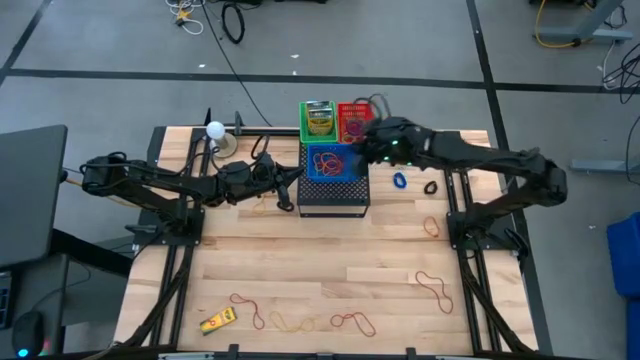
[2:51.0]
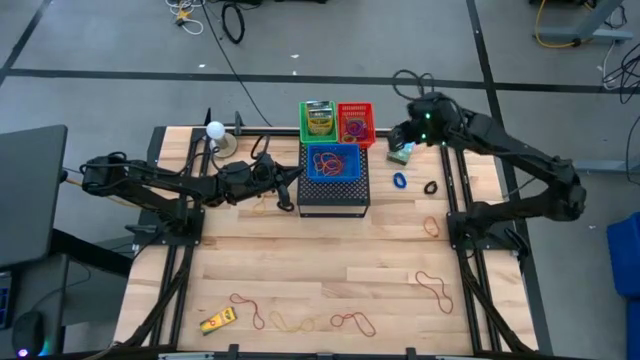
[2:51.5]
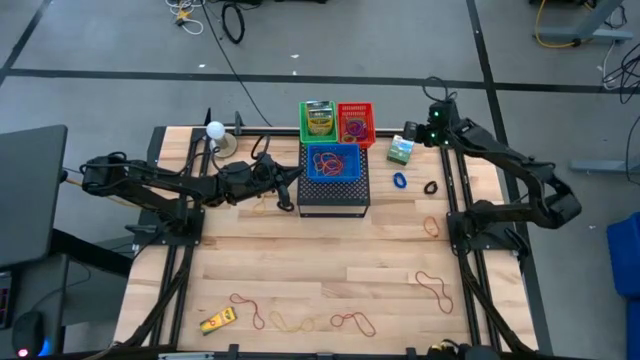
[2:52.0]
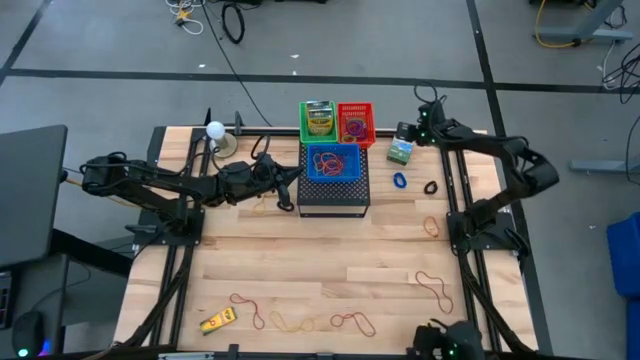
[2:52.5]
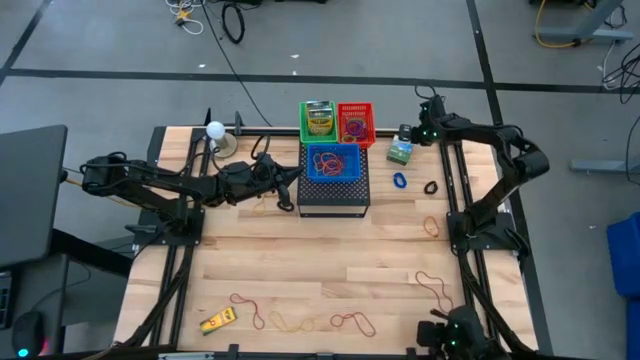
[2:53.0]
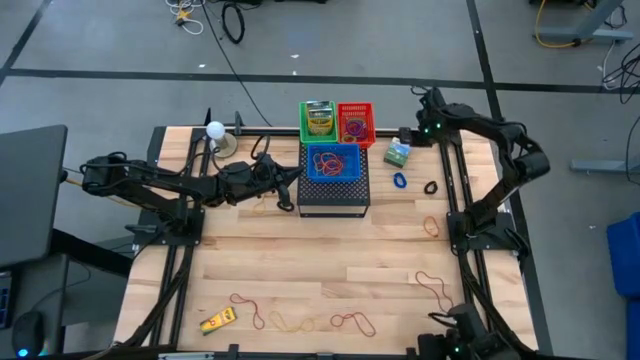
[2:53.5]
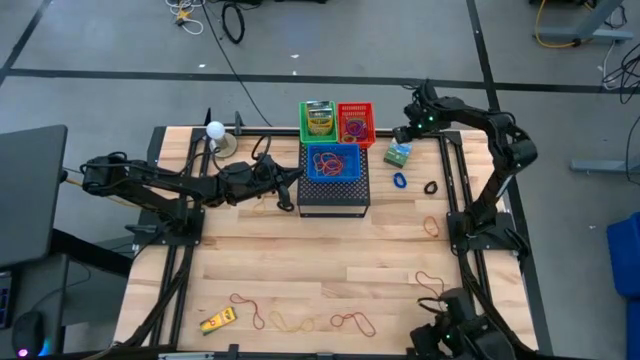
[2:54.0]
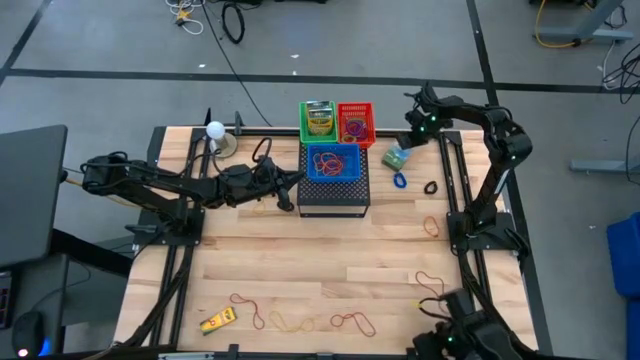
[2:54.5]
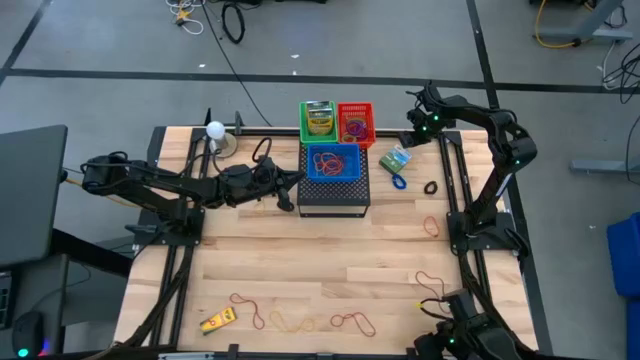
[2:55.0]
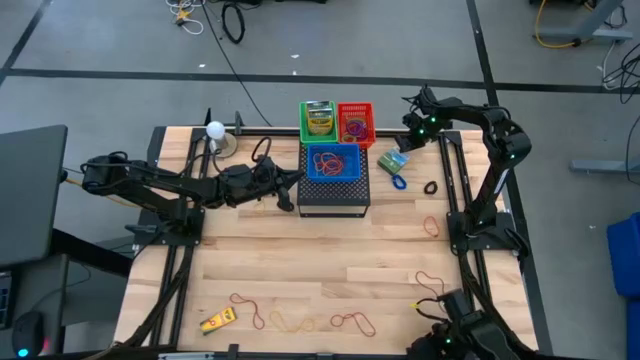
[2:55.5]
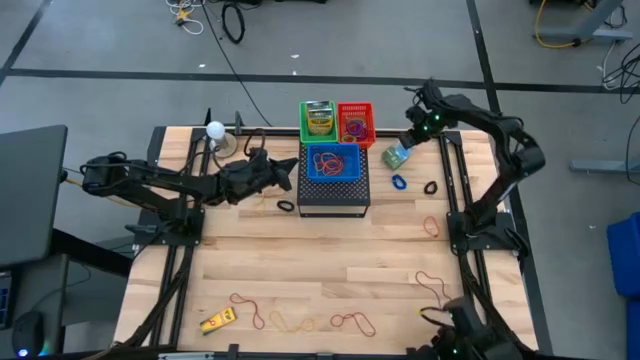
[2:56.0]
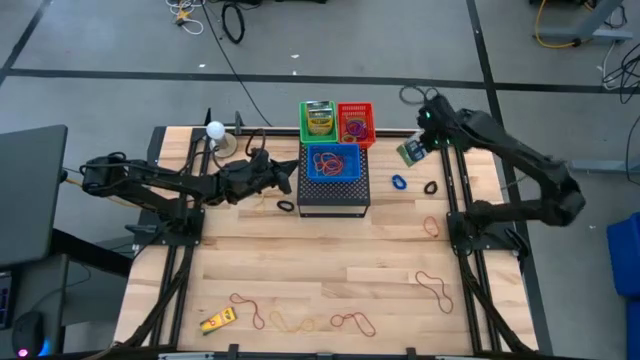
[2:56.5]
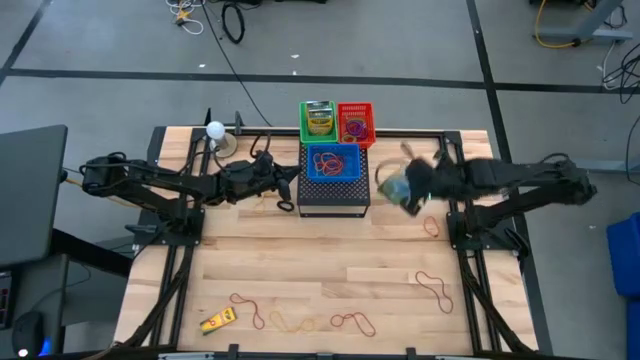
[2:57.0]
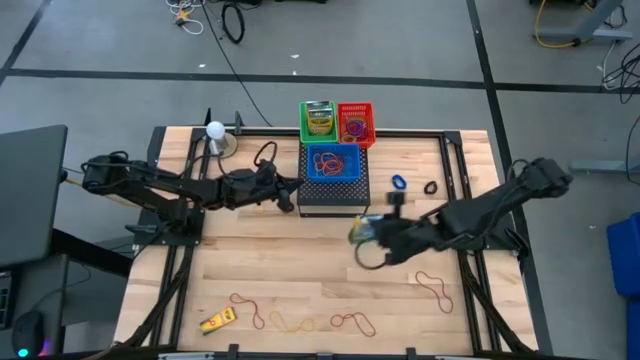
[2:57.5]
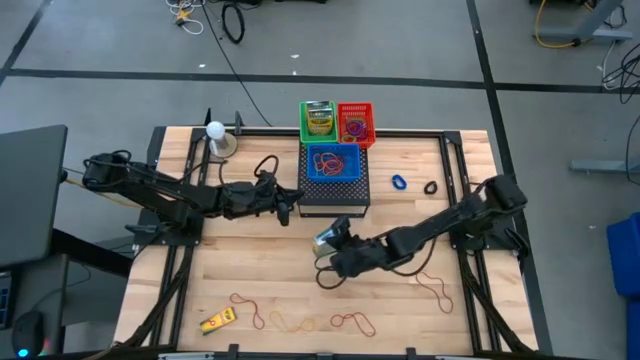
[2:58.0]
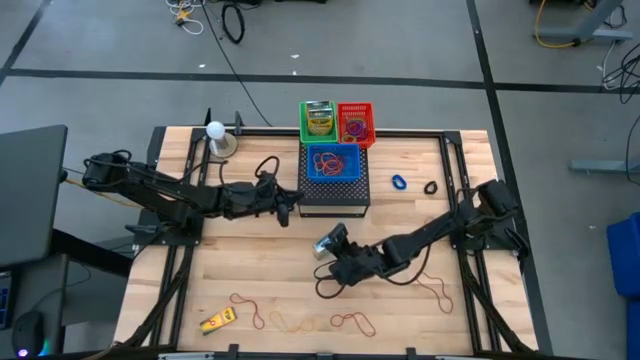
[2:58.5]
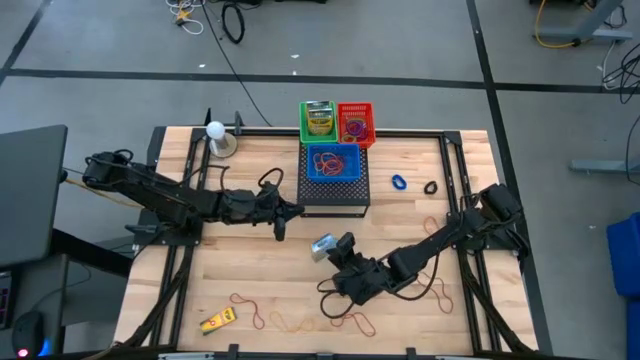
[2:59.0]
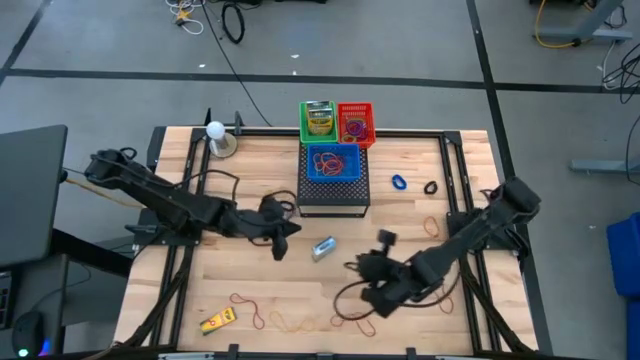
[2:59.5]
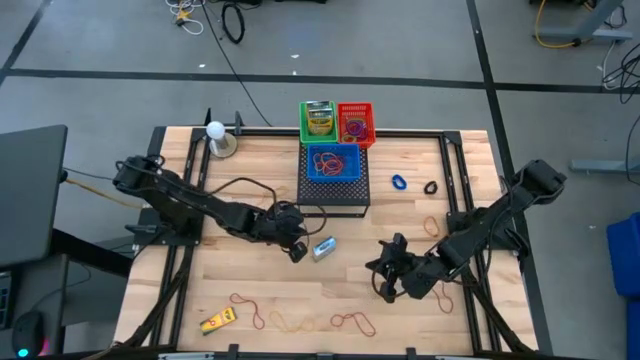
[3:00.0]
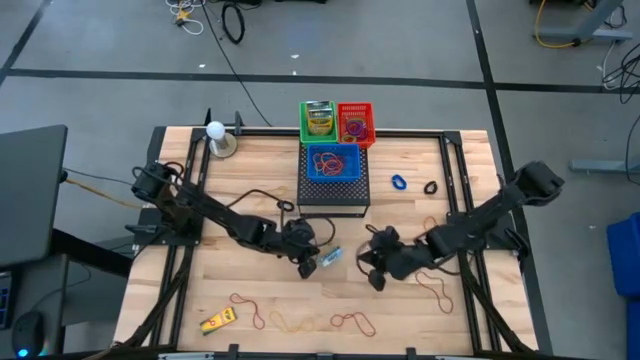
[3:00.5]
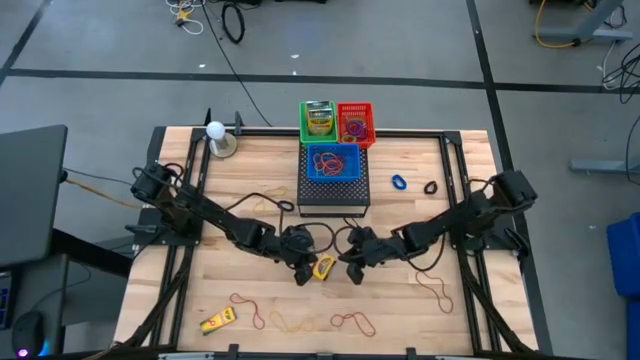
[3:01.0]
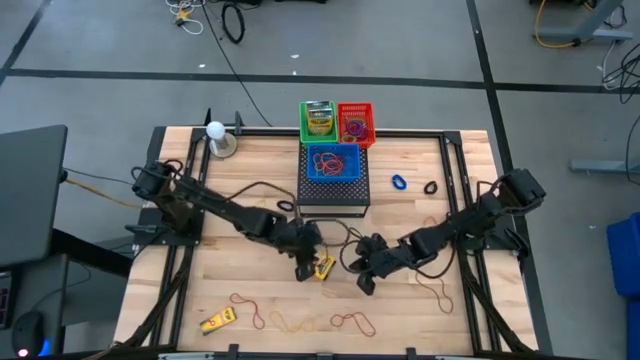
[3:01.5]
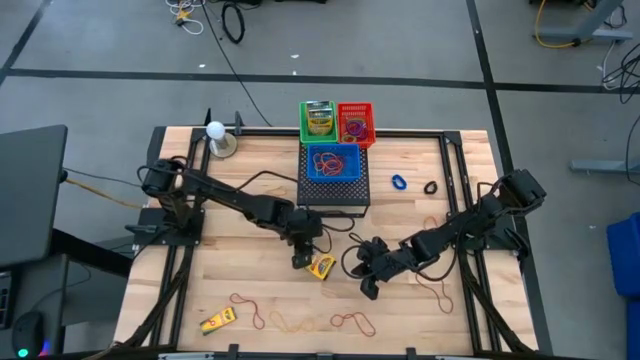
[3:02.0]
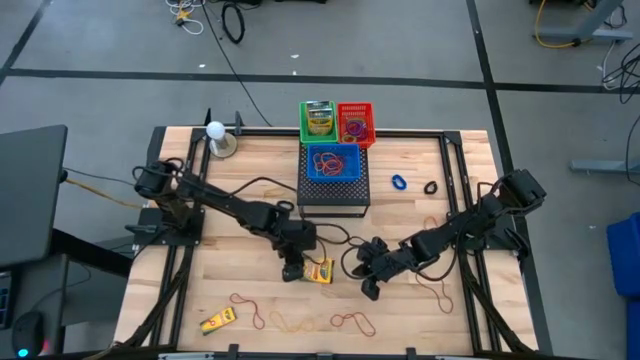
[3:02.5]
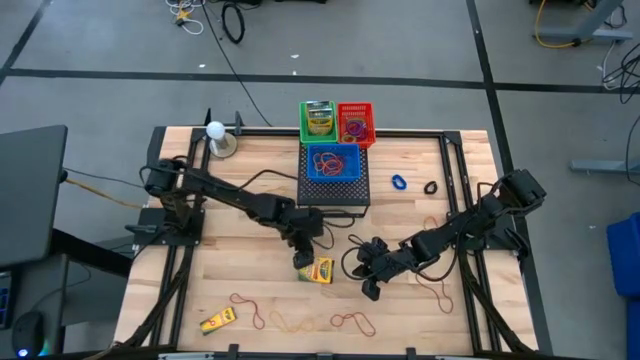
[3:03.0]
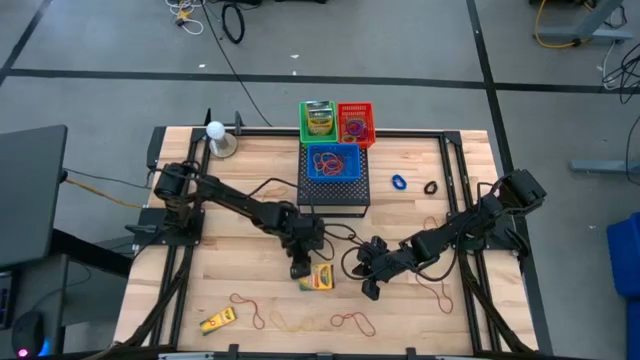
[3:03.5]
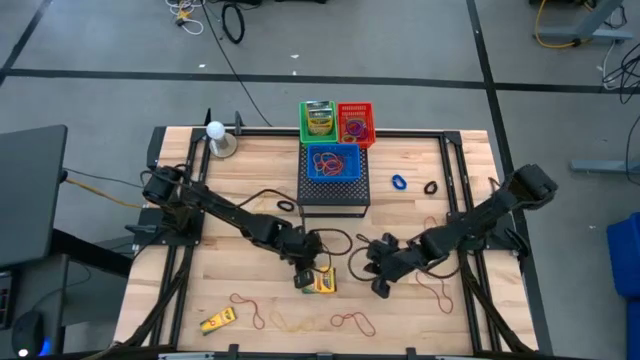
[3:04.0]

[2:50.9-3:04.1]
Task: Pick & Place Office Desk Supplies
Put the box of crayon into the green bin on the shelf

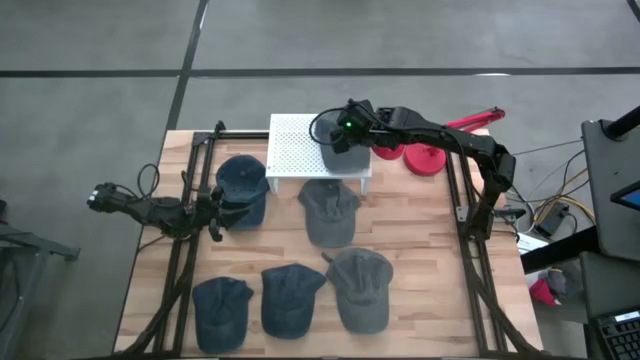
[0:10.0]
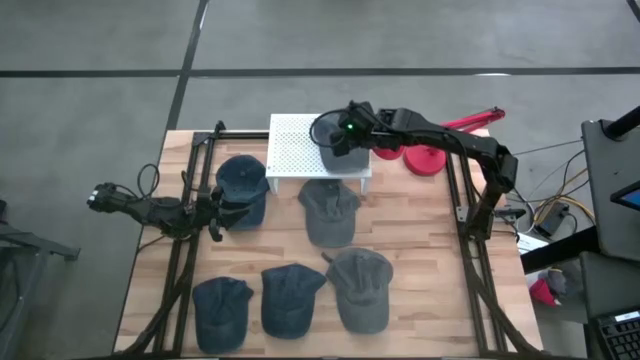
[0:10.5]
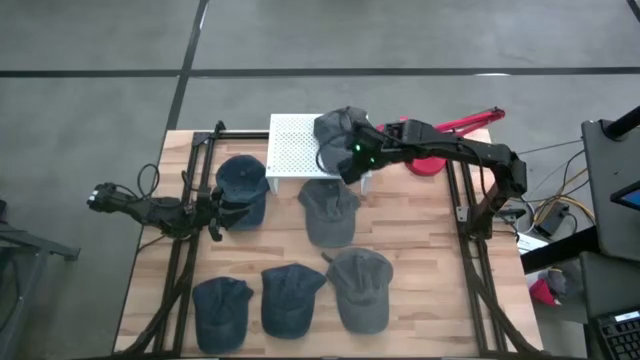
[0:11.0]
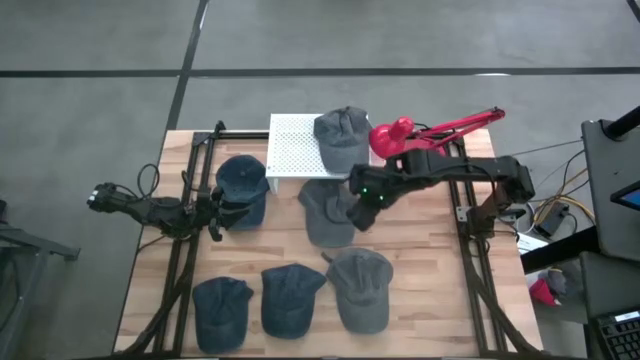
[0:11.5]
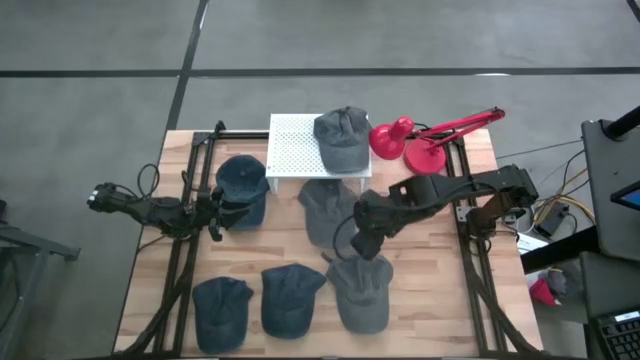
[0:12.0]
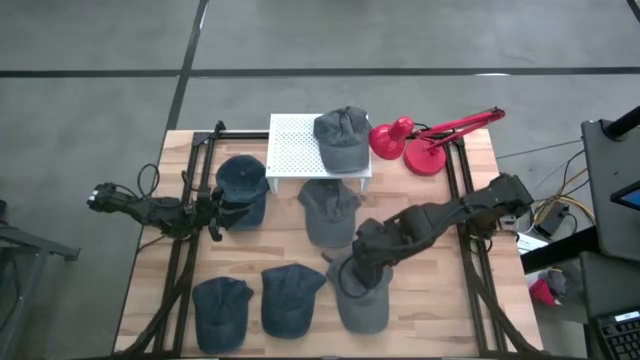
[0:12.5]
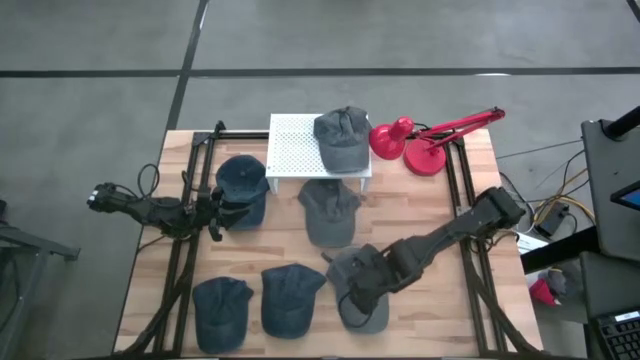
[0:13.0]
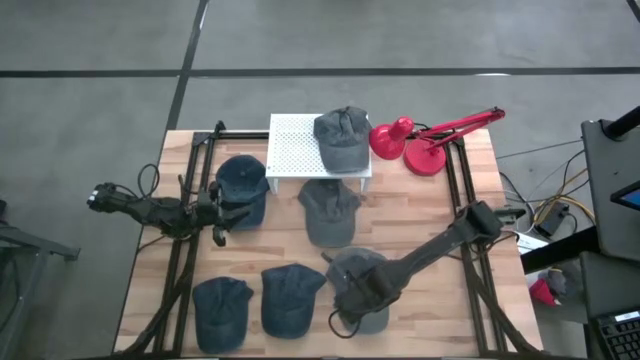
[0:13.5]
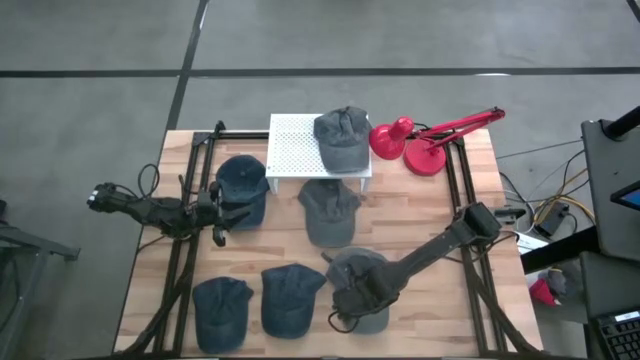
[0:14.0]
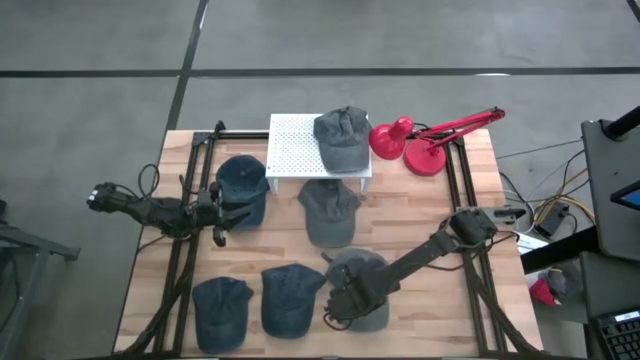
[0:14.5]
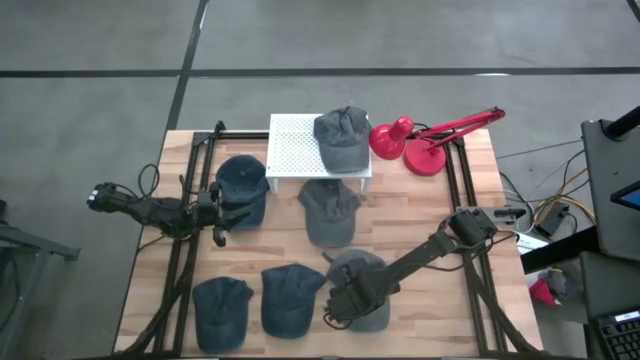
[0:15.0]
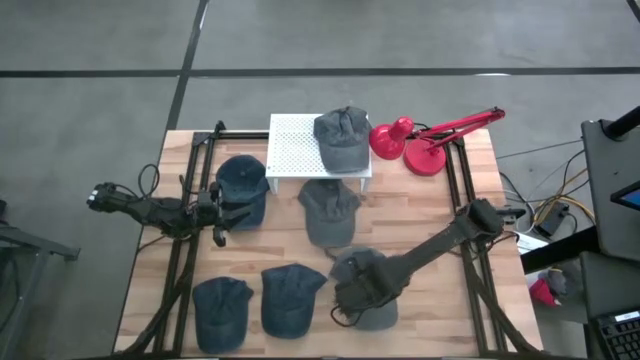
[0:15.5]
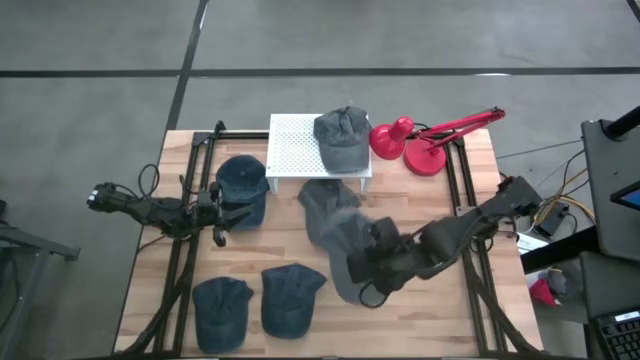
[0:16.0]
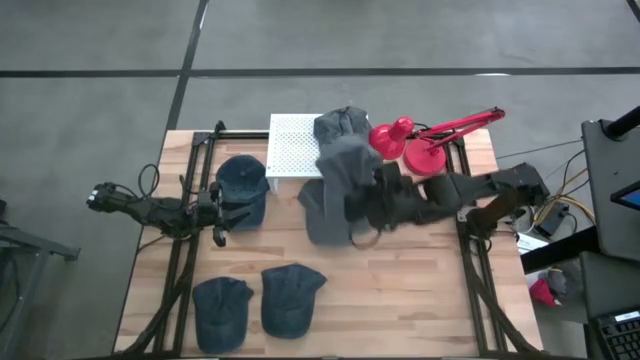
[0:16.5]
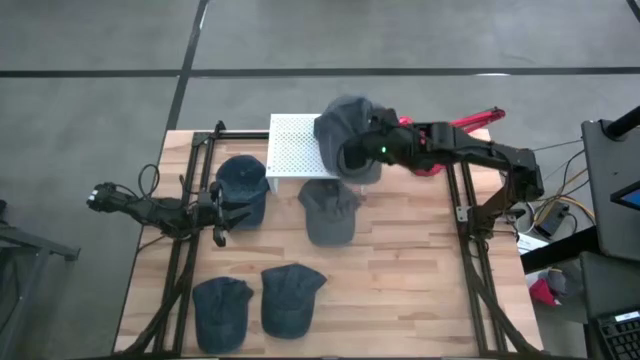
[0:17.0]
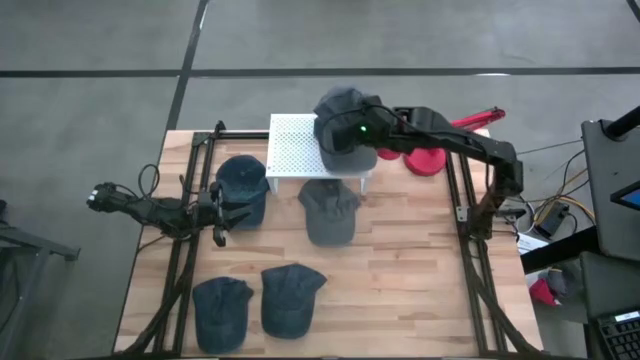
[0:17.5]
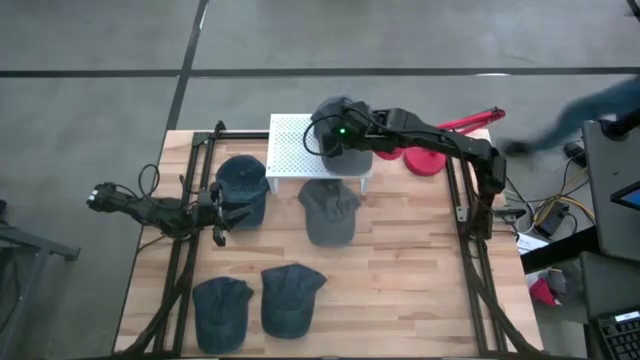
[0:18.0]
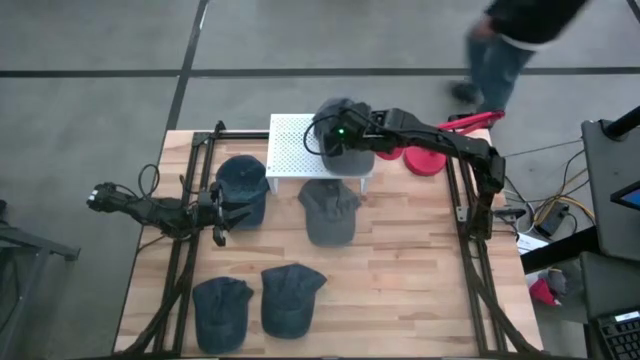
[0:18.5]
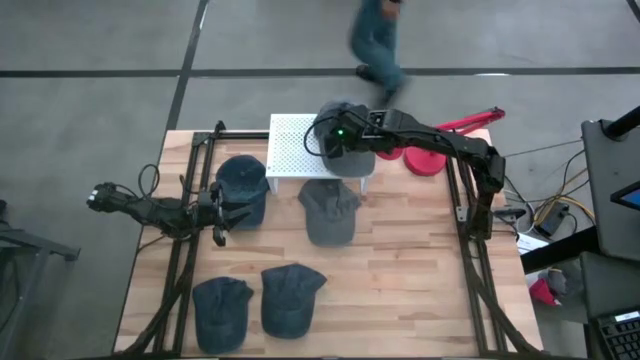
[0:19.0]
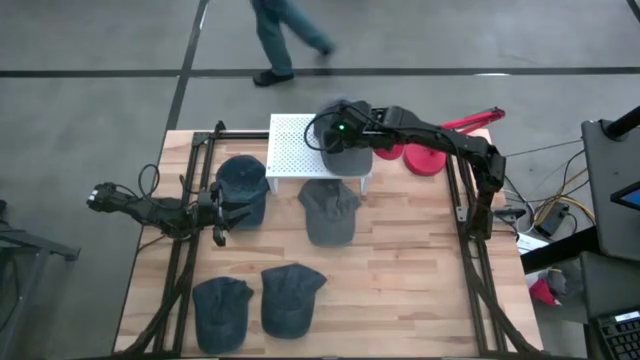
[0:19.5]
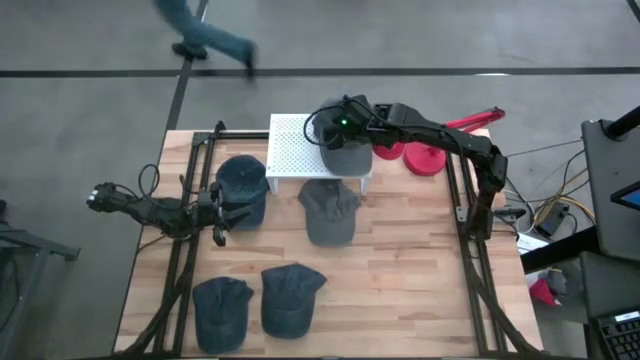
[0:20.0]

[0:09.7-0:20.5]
Task: Pick & Place hat
Stack the bottom gray cap on top of the gray cap on the shelf
